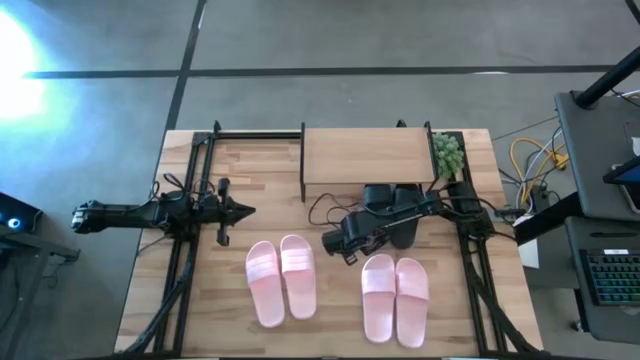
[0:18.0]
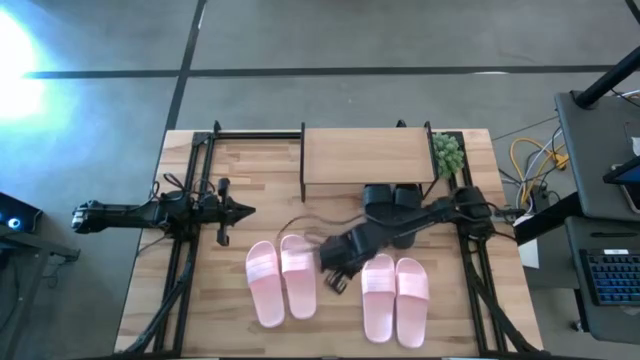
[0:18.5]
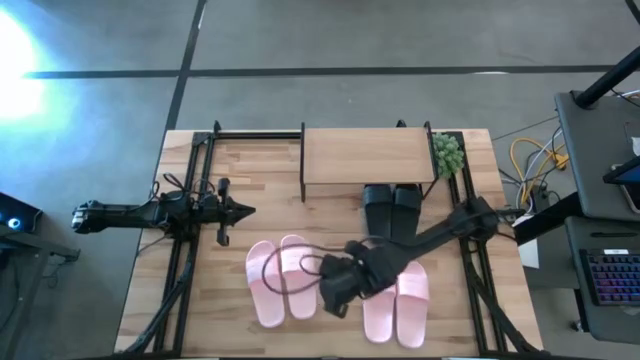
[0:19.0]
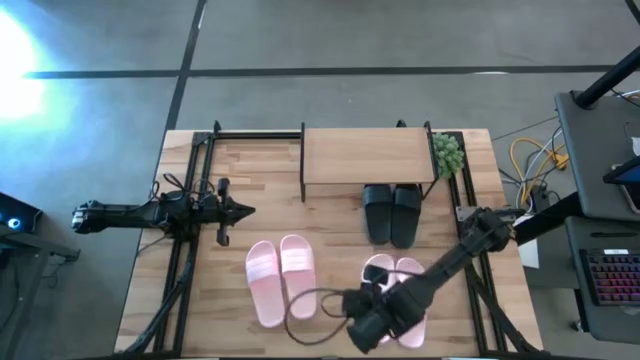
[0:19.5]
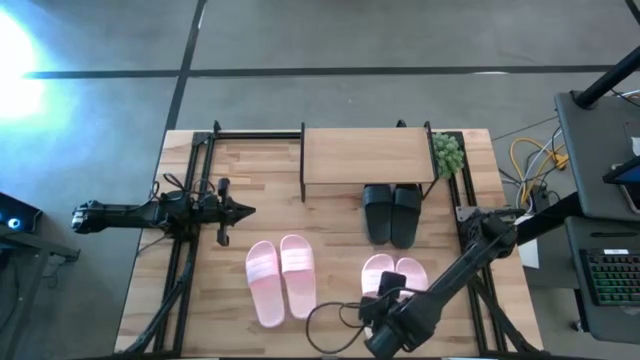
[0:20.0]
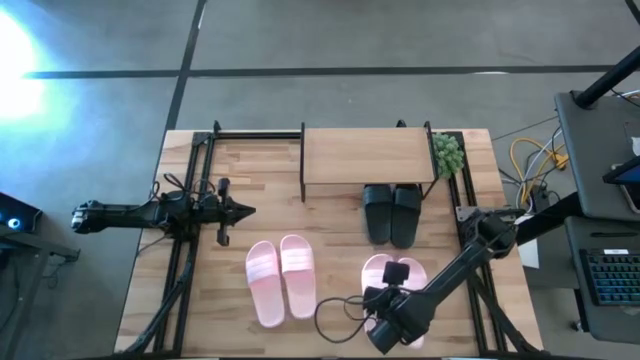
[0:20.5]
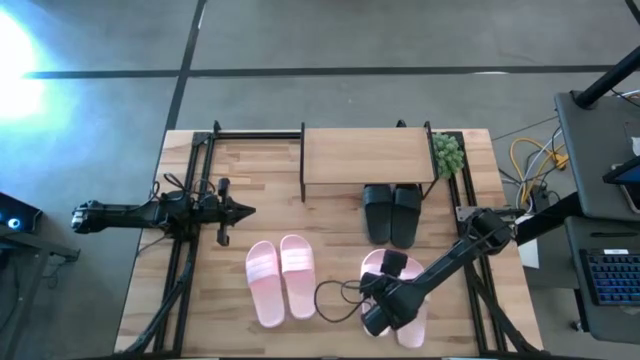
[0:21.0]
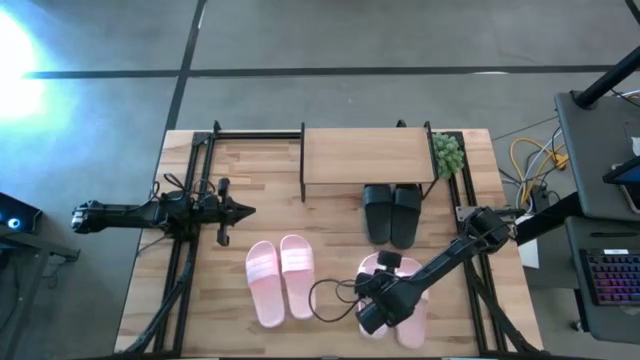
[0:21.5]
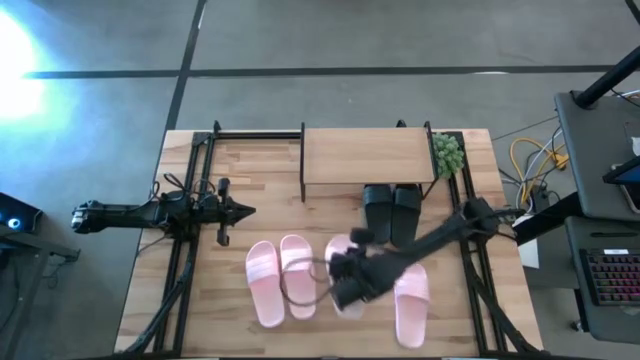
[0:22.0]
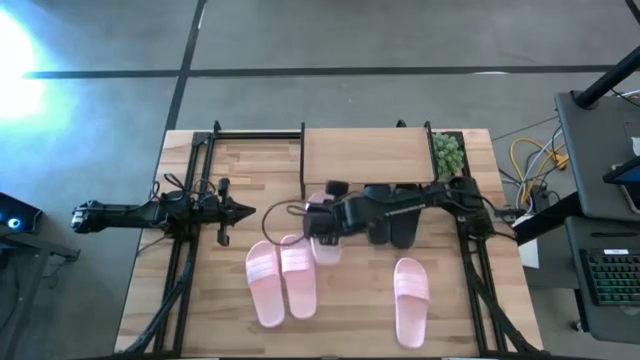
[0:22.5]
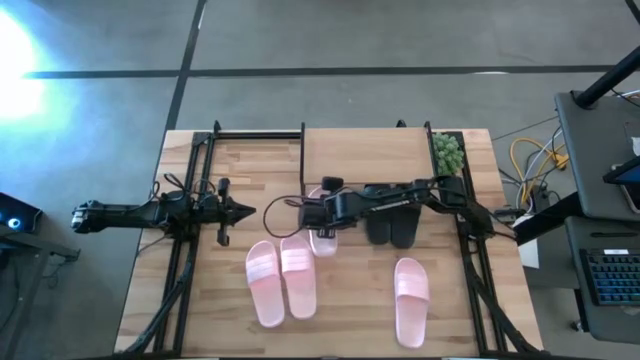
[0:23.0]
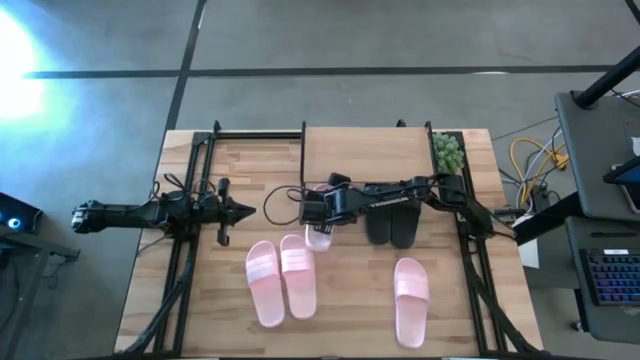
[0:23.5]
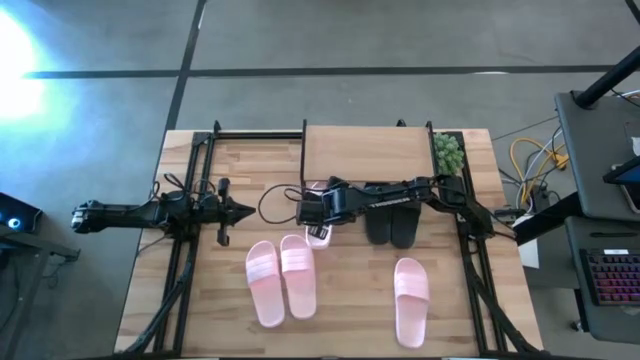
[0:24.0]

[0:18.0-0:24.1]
Task: Pick and place slides into the shelf
Put the pink slipper under the shelf

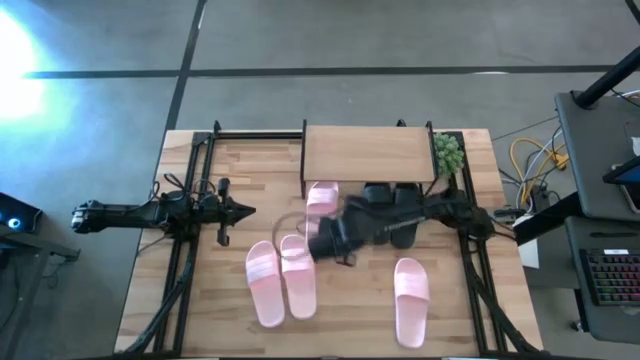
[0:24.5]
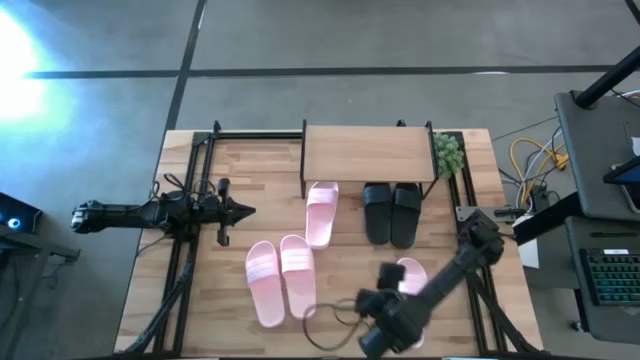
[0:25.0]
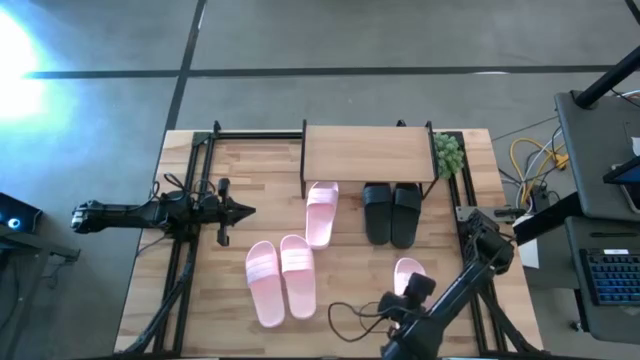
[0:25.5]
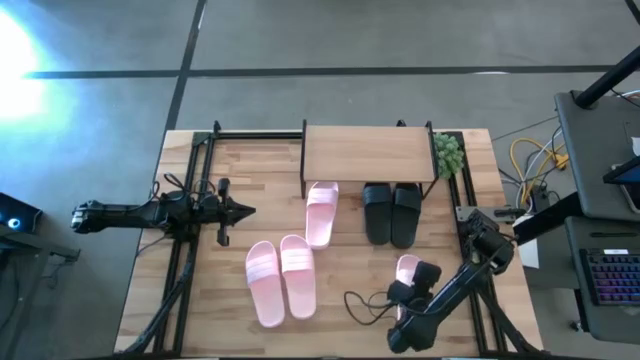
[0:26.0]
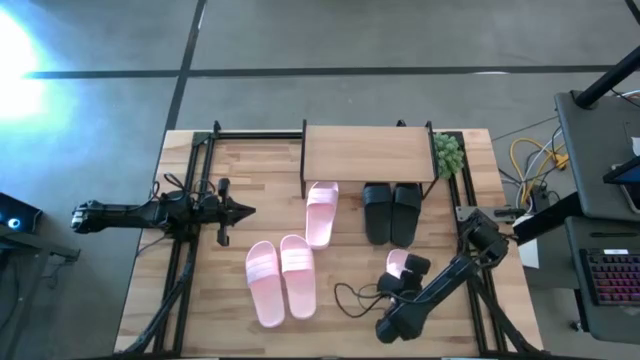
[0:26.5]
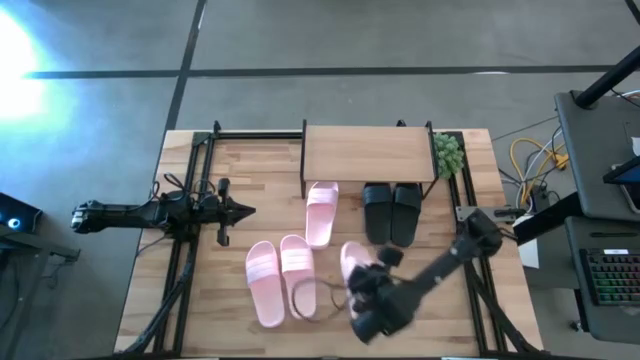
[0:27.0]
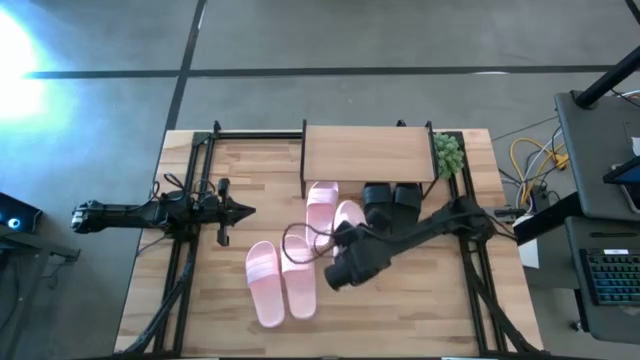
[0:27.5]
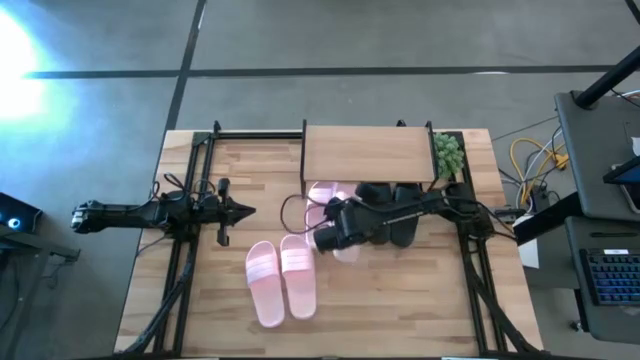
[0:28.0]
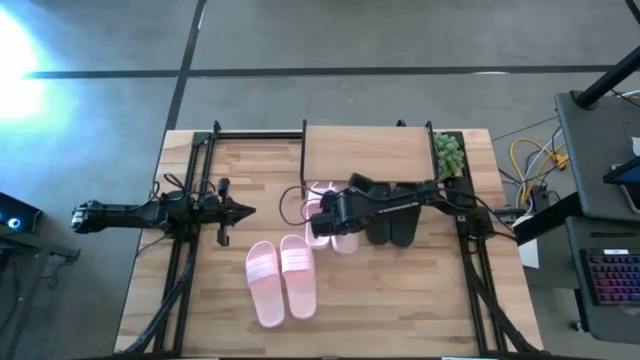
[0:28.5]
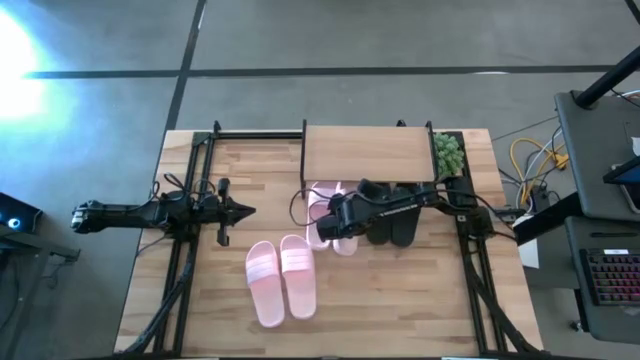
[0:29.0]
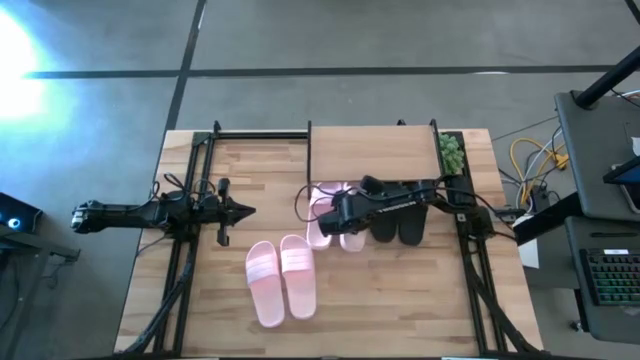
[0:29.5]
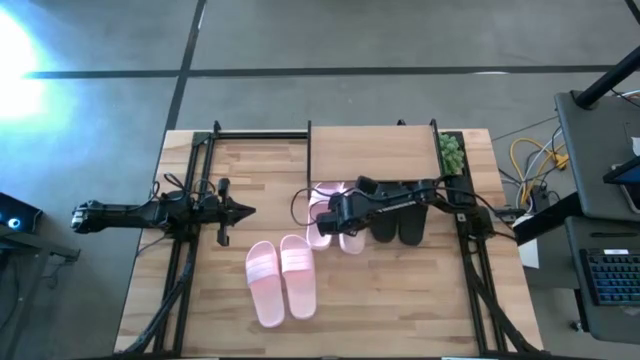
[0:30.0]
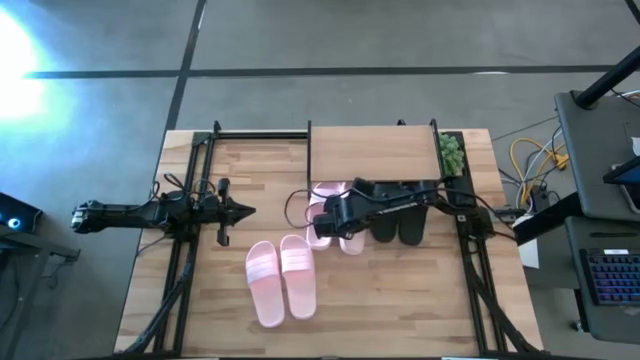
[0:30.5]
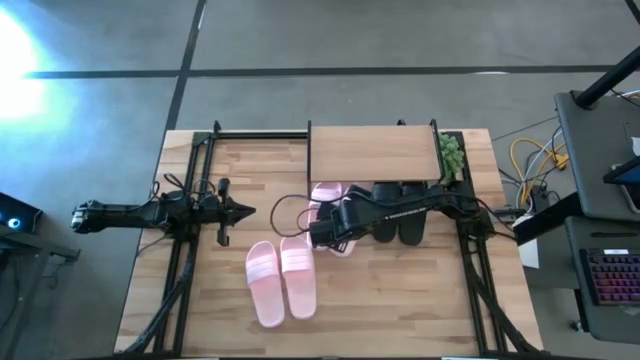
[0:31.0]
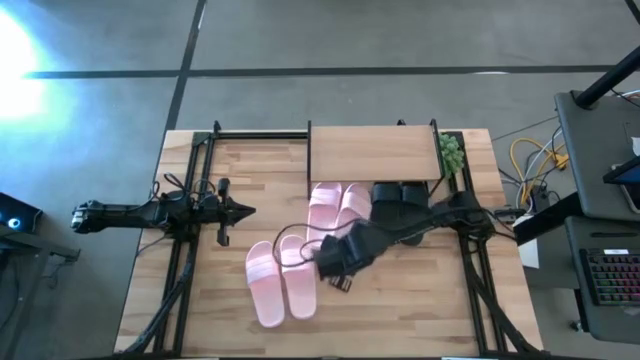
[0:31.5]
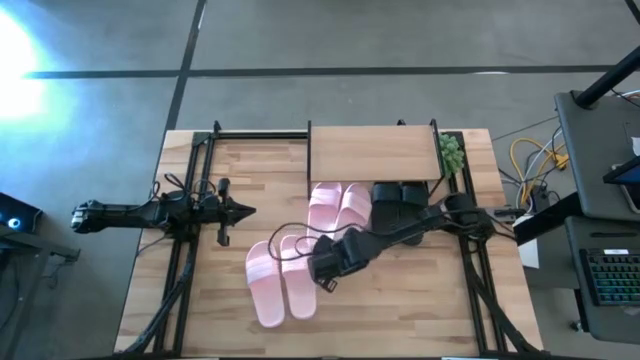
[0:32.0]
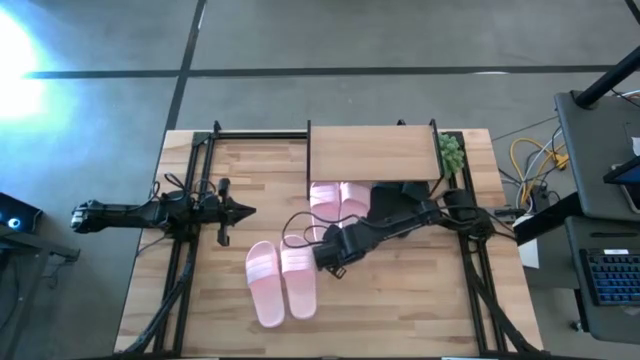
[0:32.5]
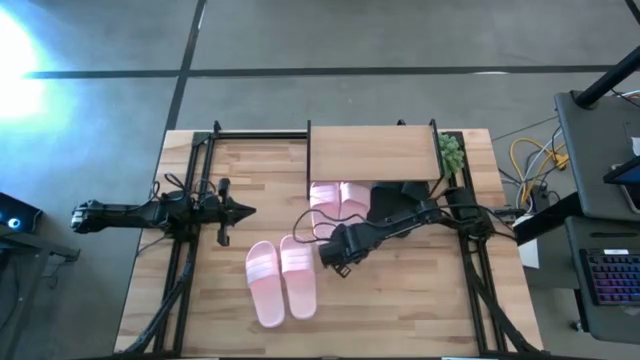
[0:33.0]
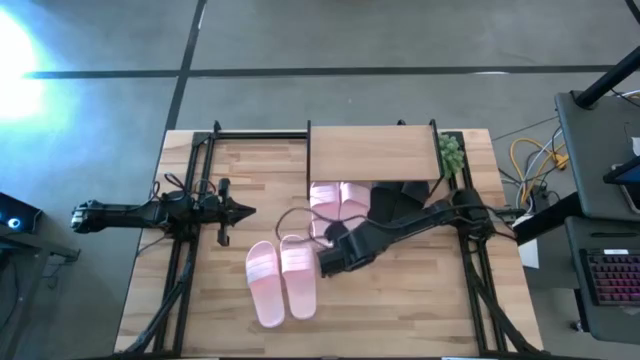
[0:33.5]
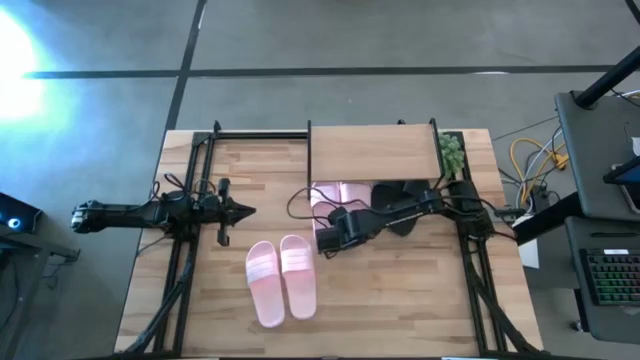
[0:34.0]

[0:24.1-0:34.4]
Put the pink slipper under the shelf

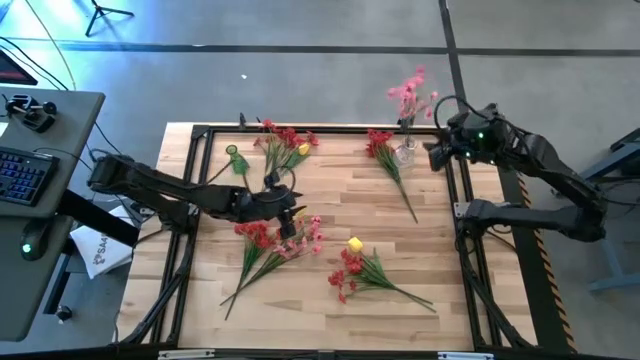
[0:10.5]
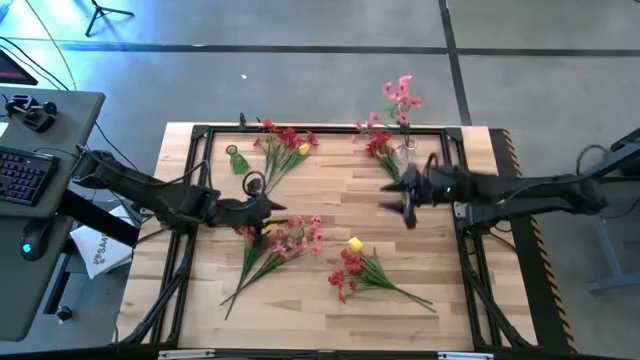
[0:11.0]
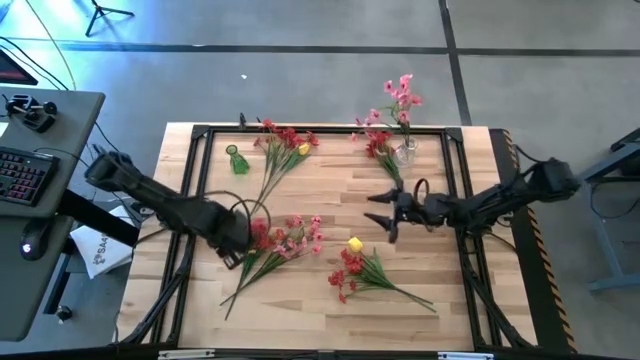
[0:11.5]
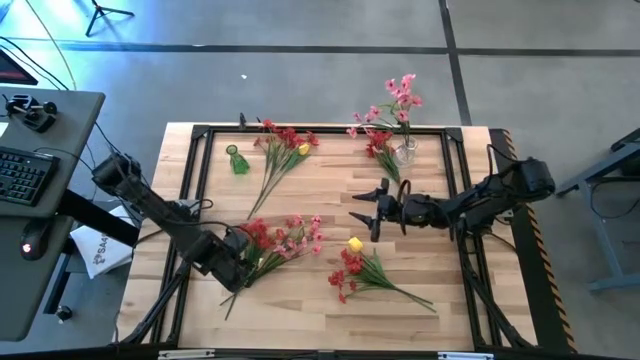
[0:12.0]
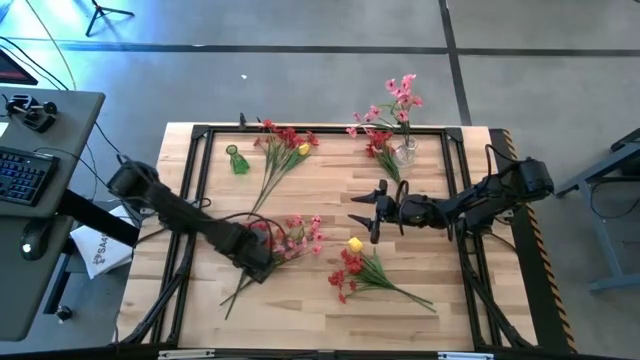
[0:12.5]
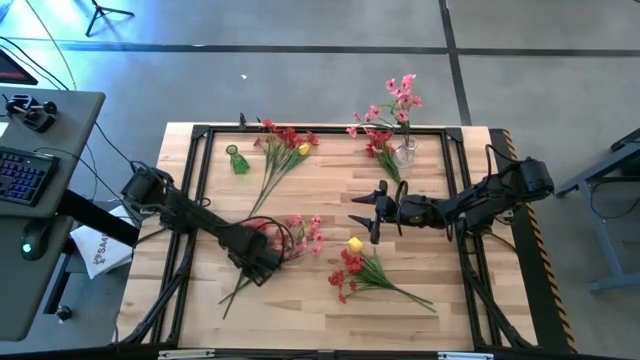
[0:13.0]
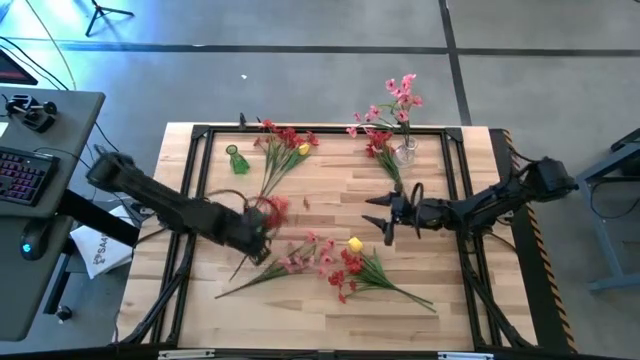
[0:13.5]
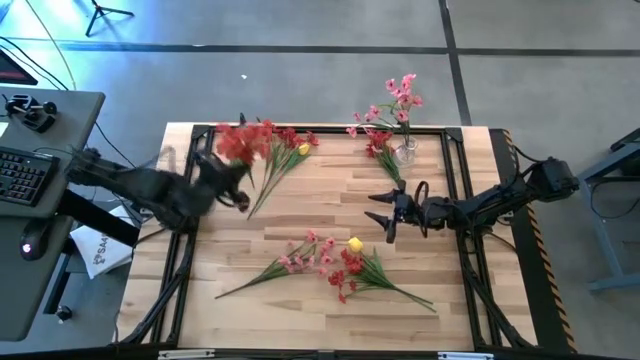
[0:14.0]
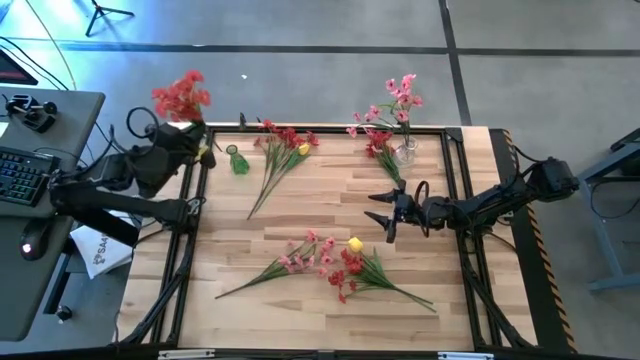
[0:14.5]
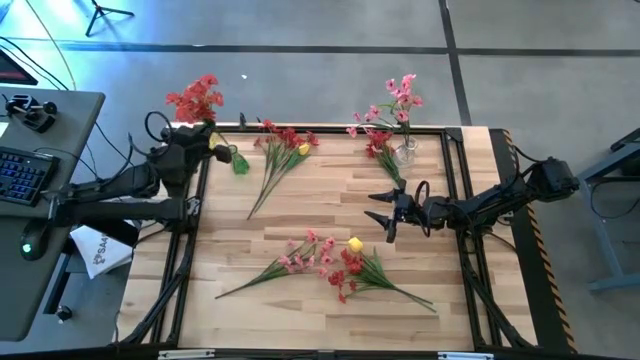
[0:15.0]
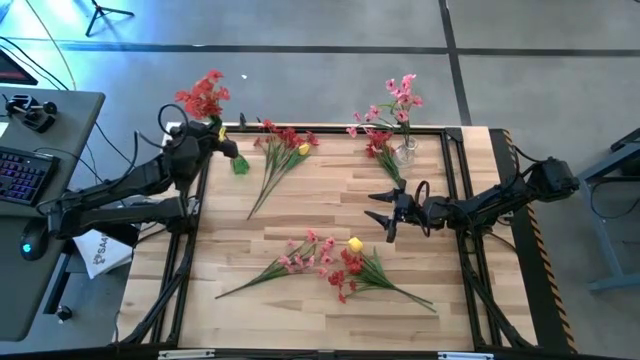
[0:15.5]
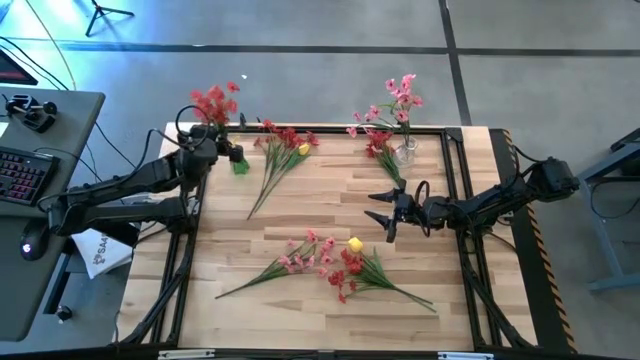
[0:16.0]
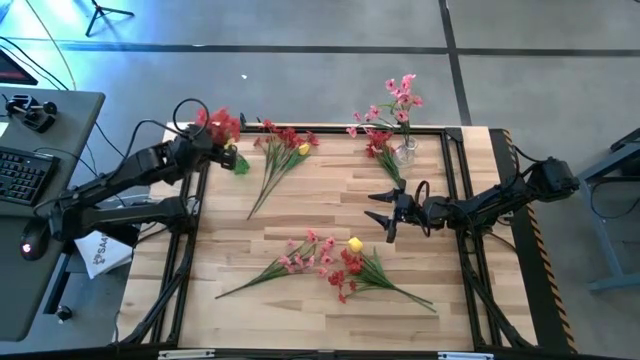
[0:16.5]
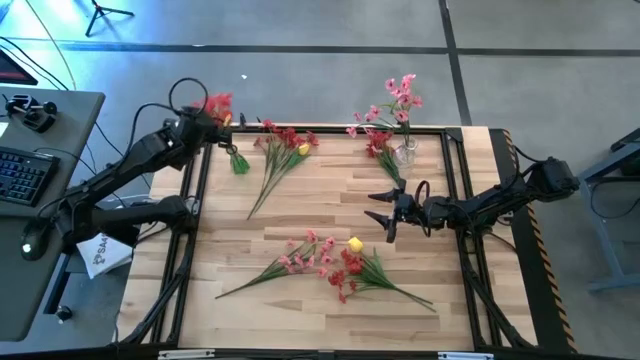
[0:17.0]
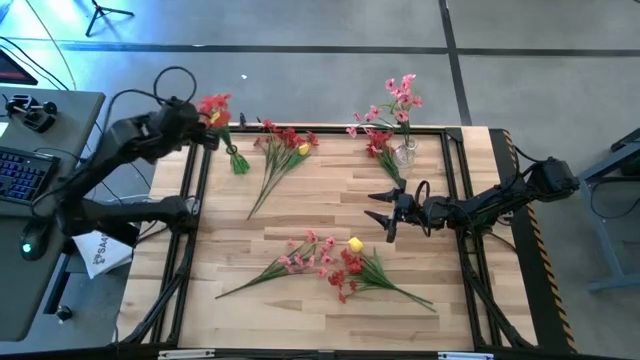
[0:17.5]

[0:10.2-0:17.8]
Task: Sort flowers into vase by color
Put the bottom left red flowers into the green vase
